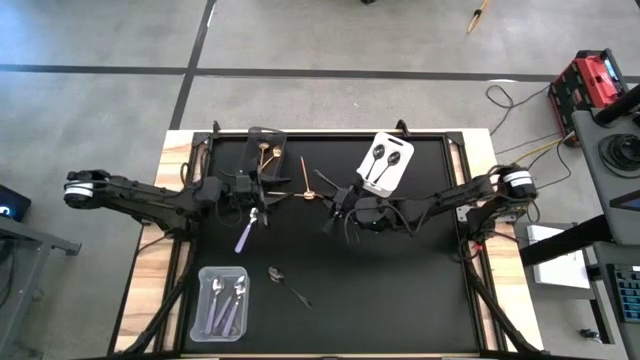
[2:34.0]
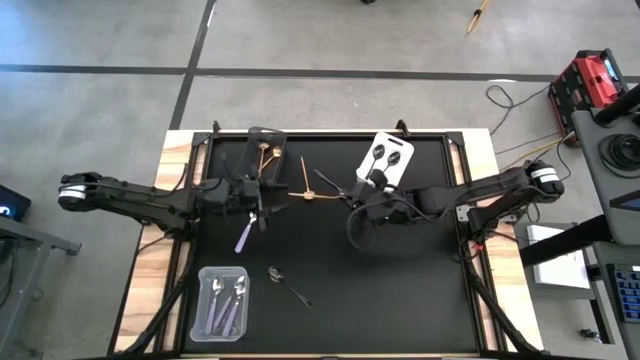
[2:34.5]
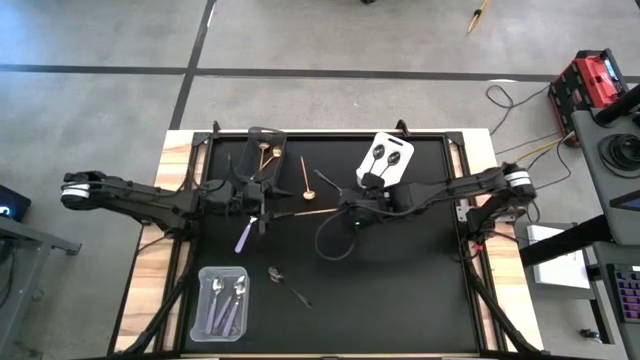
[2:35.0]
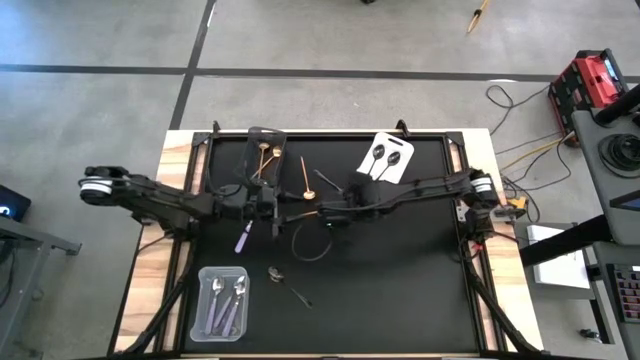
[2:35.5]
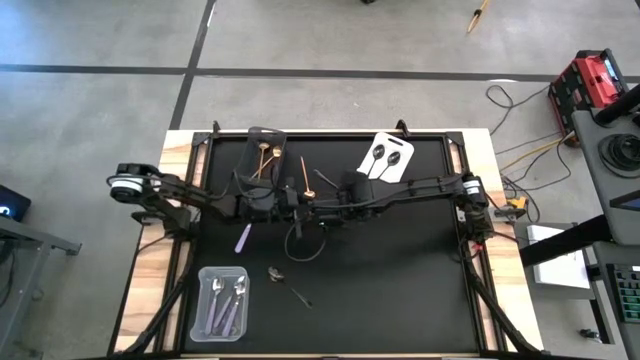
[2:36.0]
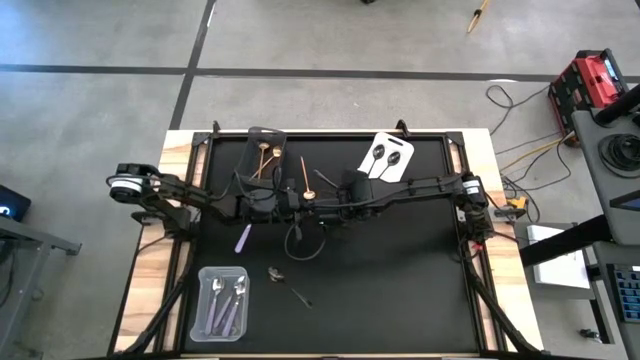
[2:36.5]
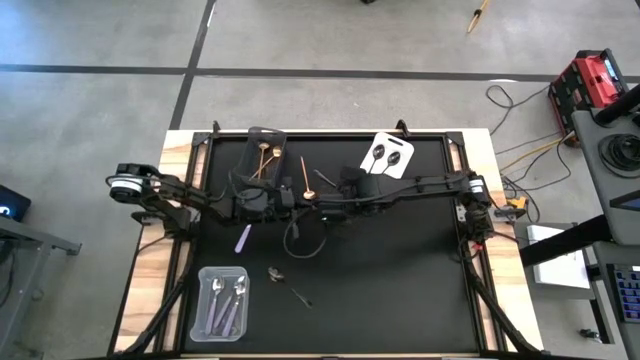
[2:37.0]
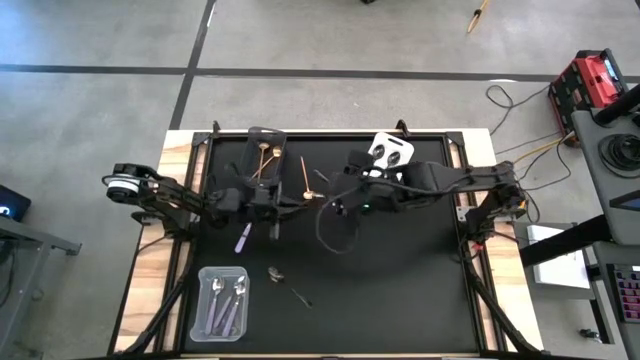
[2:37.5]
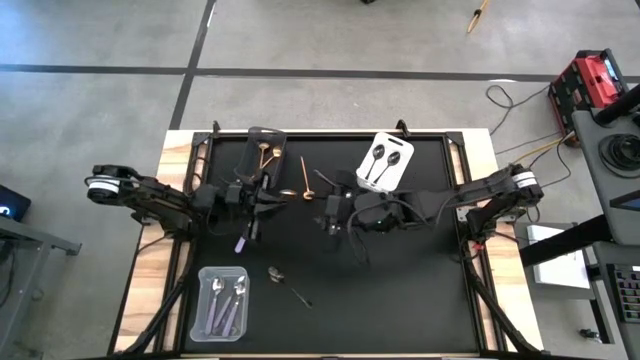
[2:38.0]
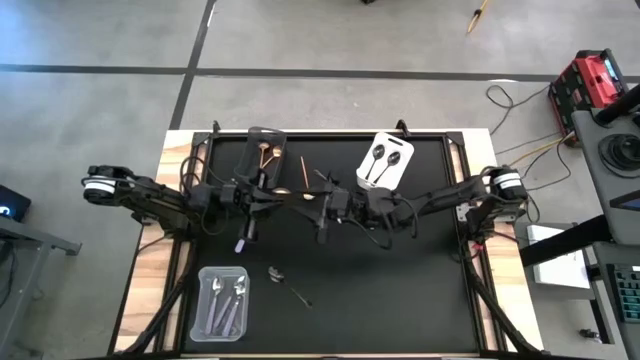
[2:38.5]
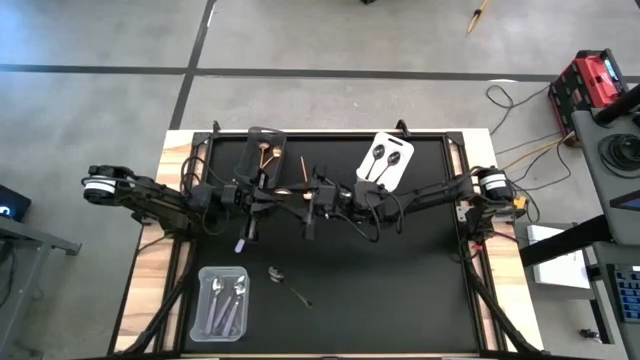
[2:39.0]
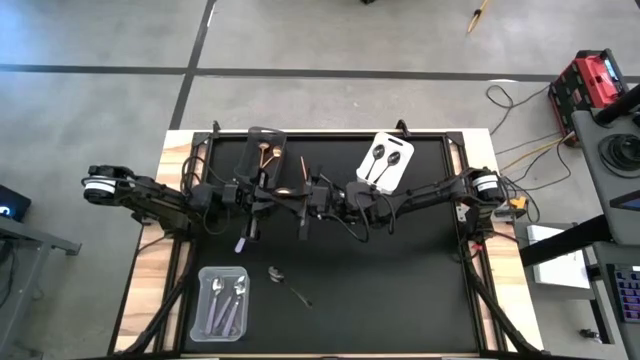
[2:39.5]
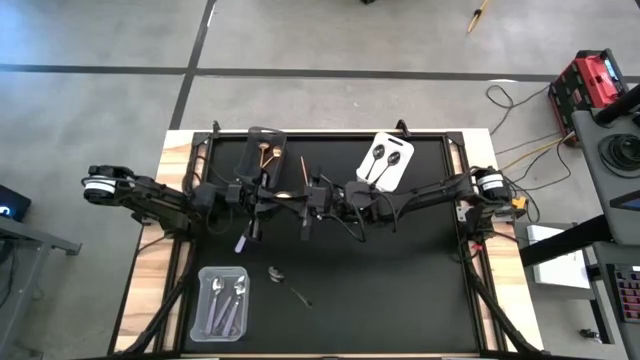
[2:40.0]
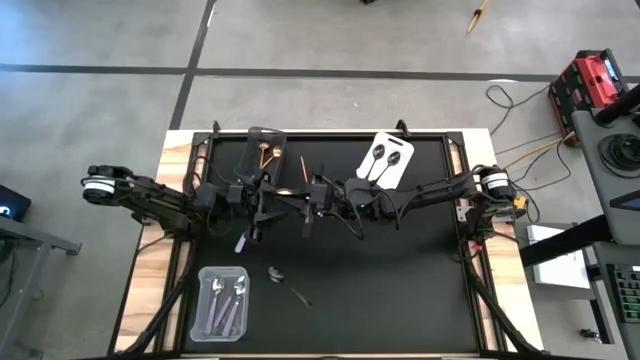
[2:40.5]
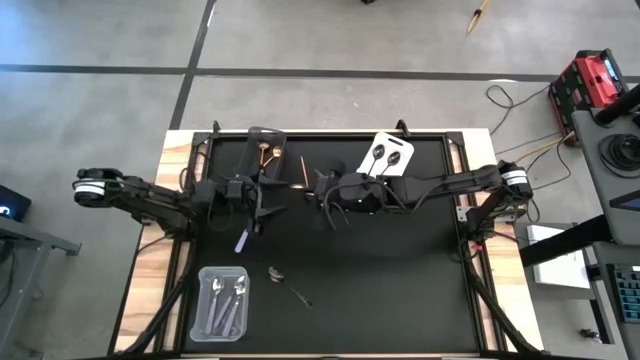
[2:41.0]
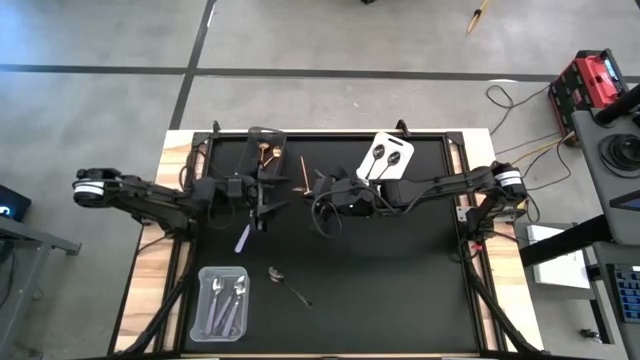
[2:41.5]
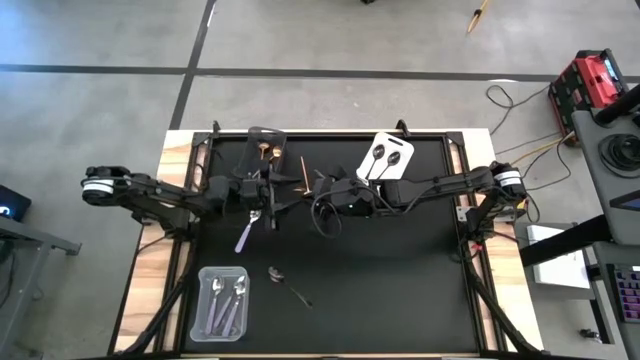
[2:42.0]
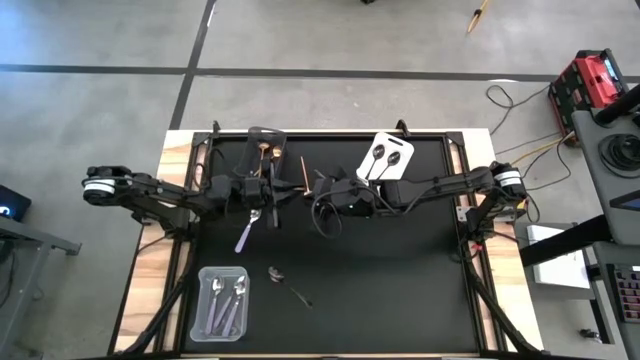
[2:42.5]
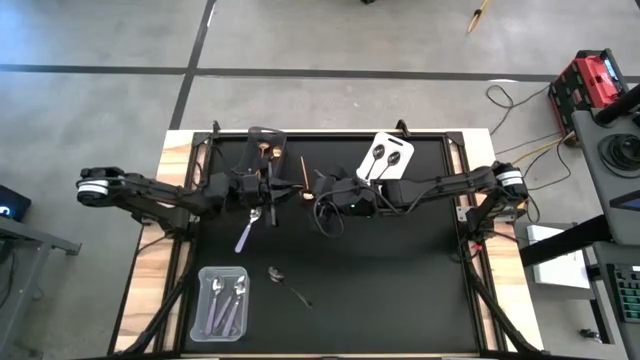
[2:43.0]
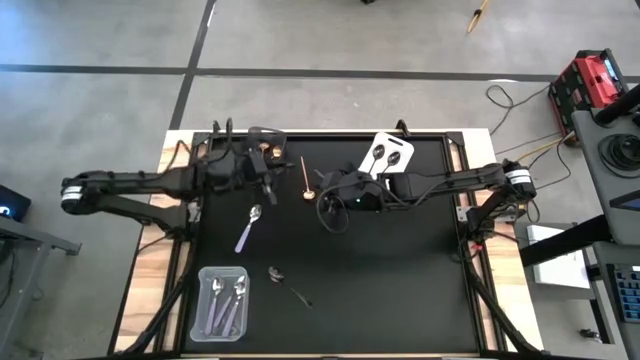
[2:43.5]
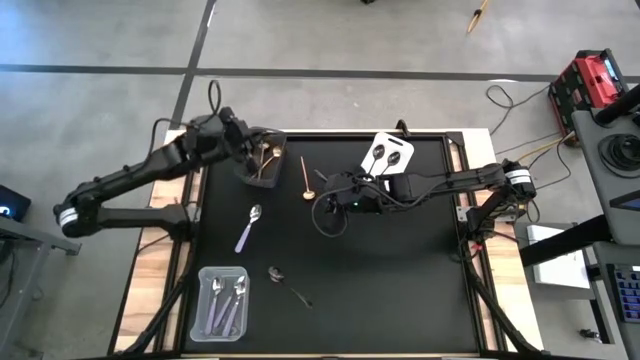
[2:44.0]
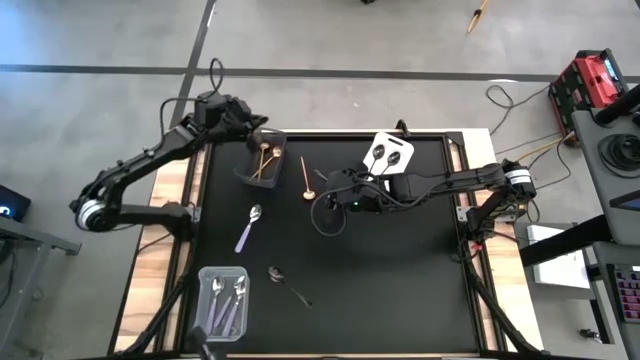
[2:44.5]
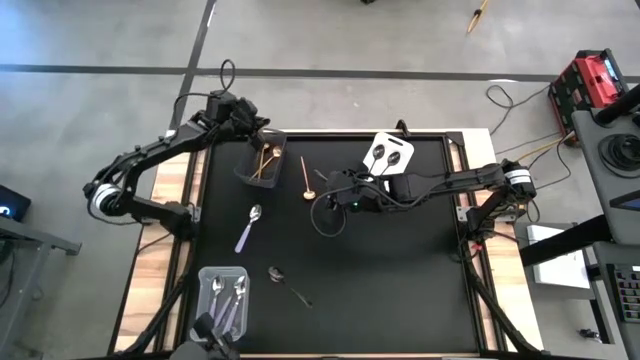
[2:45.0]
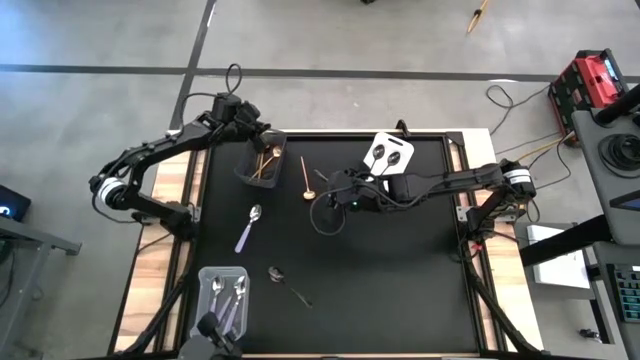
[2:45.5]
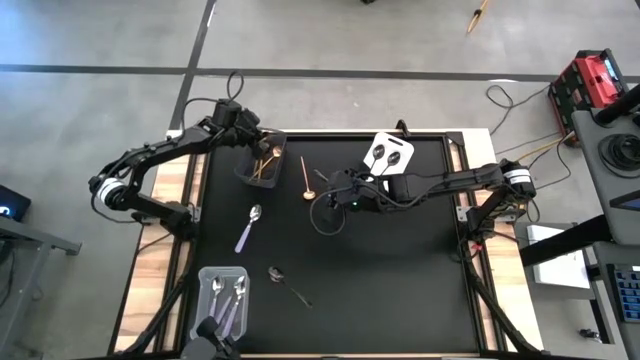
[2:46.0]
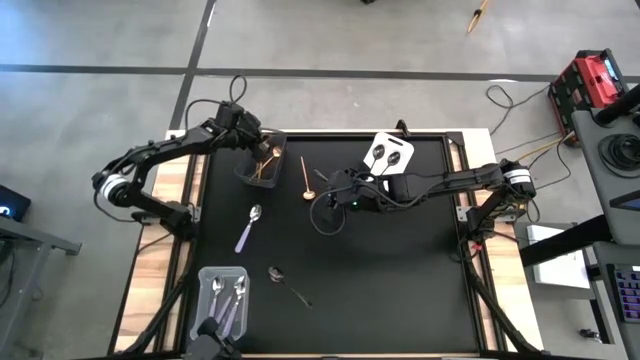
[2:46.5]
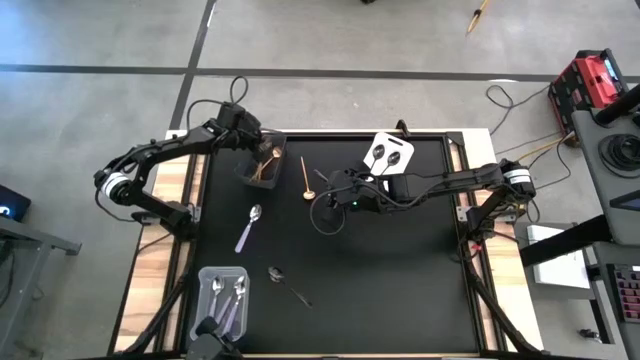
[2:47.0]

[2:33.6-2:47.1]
Task: Sort silverware by color (type)
Put the gold spoon into the black bin

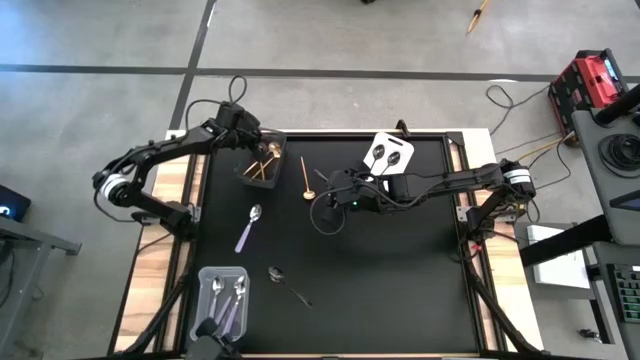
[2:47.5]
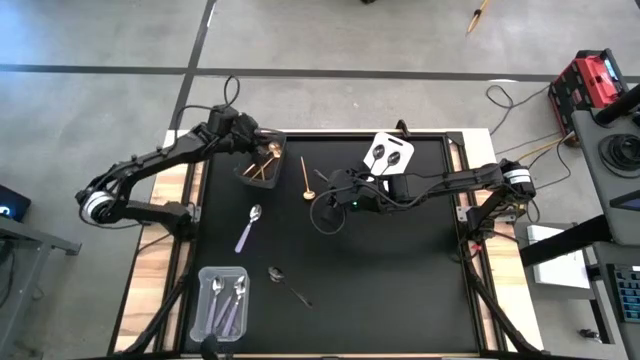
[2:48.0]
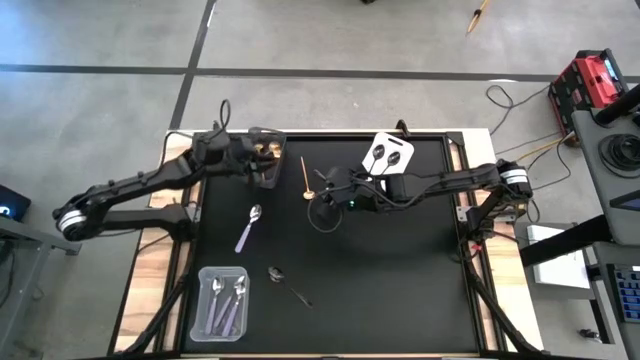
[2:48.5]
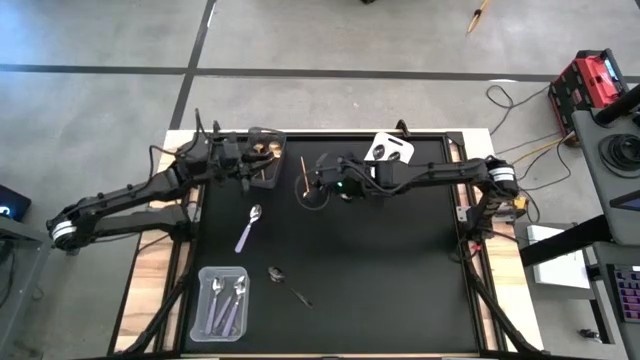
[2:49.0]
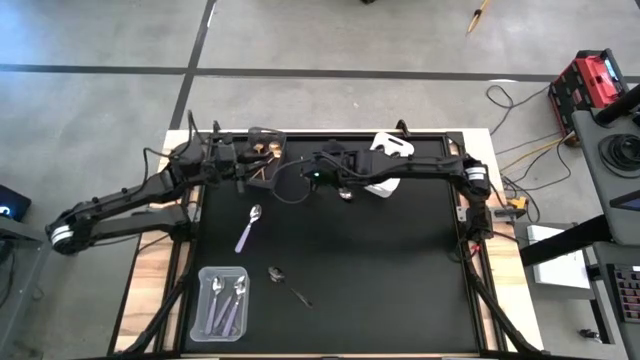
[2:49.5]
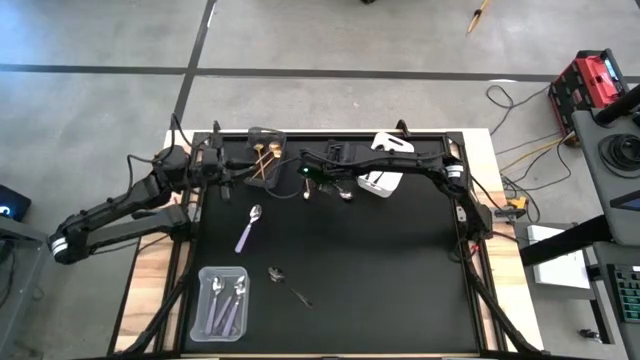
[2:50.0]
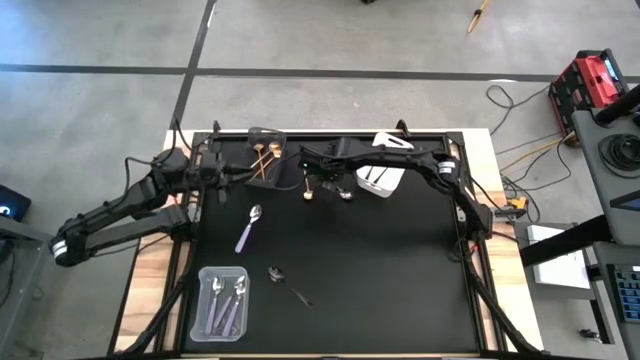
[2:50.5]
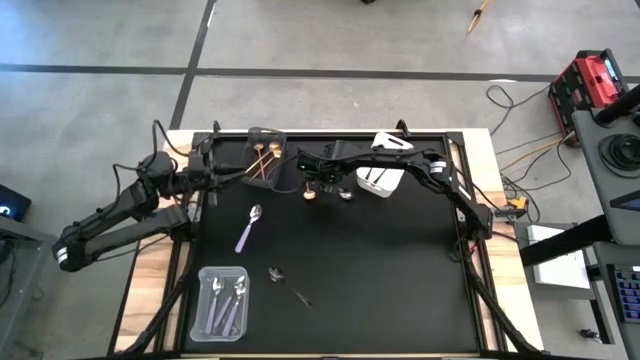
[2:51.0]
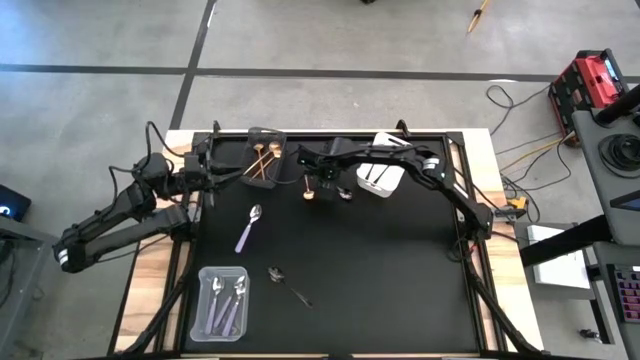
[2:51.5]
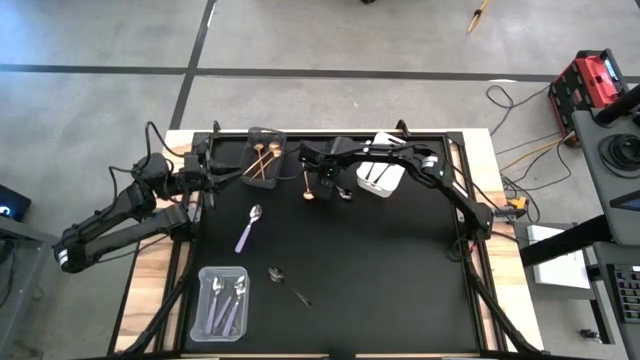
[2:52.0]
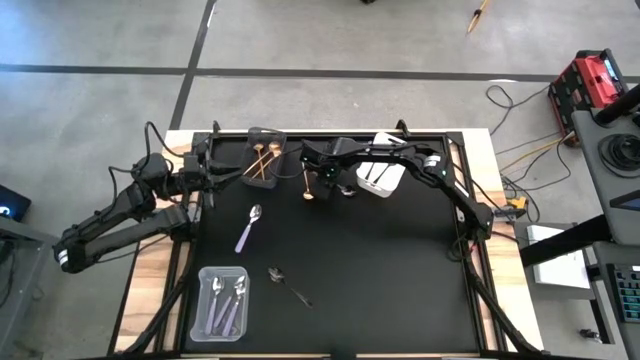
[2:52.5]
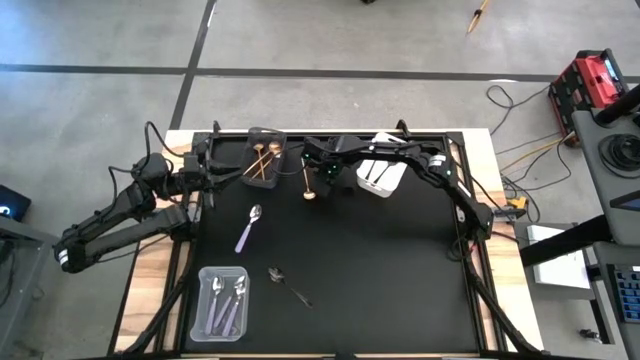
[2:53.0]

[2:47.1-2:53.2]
Put the black spoon into the white bin

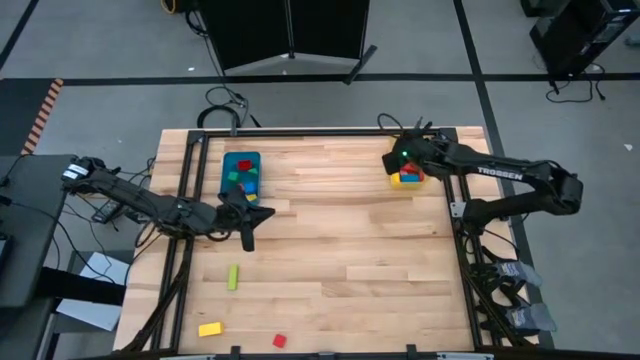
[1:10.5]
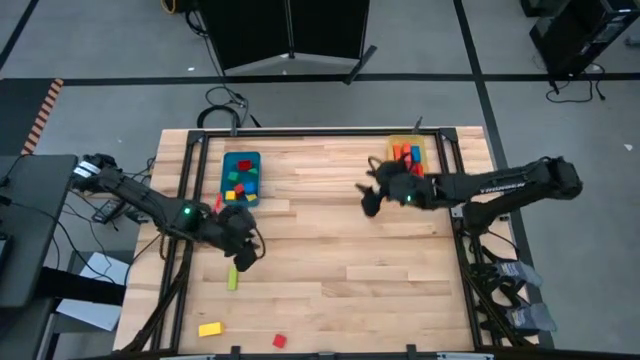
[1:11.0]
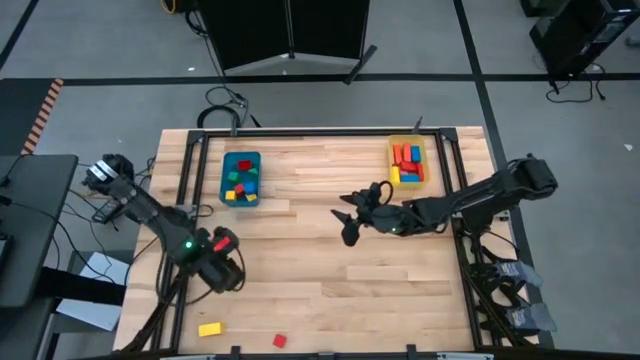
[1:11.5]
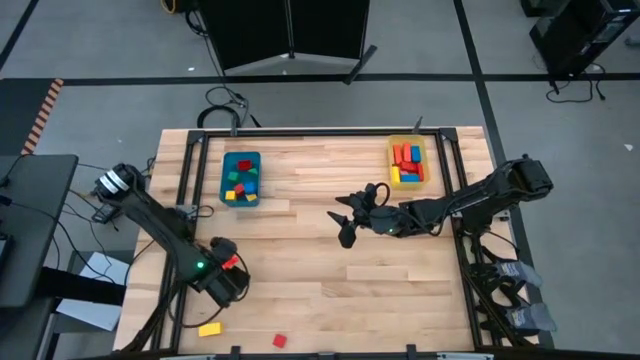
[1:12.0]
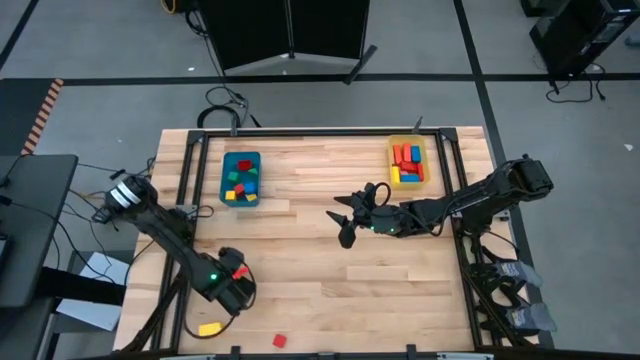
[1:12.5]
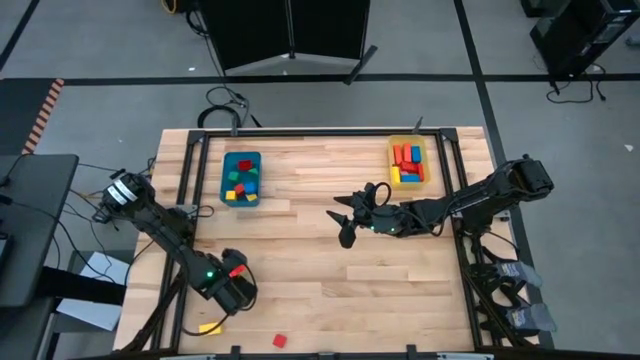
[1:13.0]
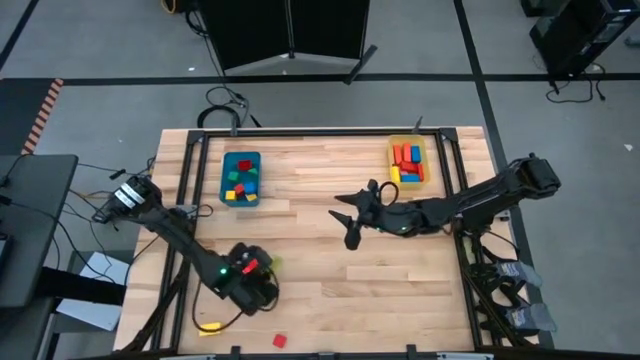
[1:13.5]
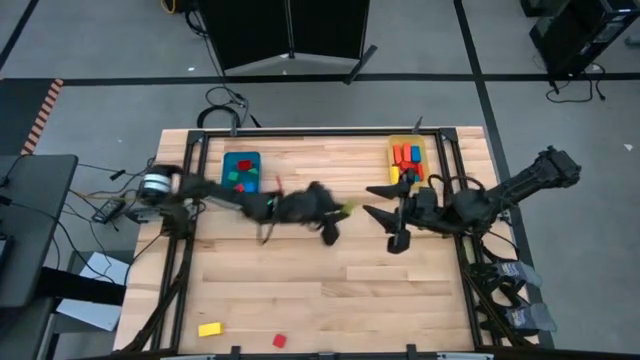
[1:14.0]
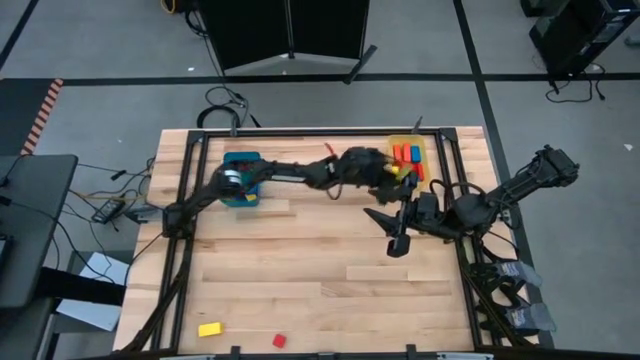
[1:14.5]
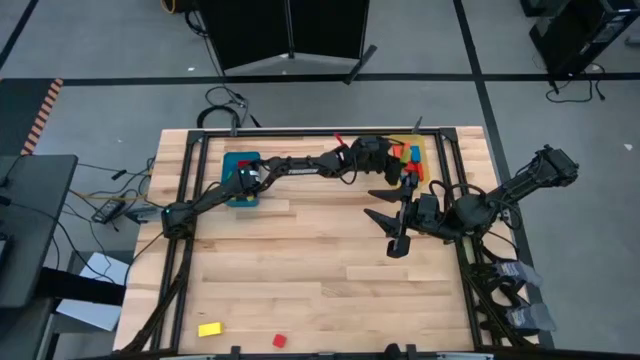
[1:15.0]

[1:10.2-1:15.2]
Task: Sort blocks by size
Put the large green block into the yellow bin
